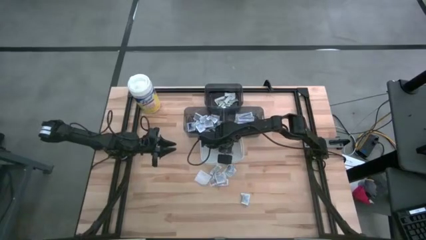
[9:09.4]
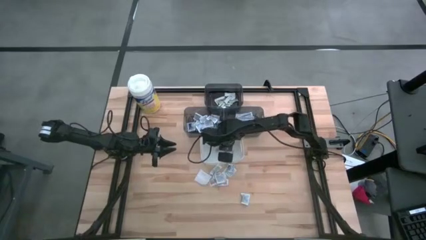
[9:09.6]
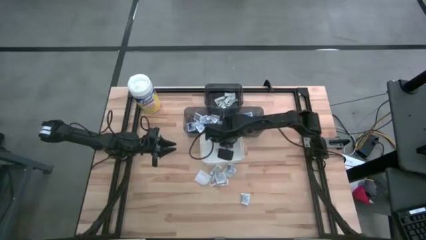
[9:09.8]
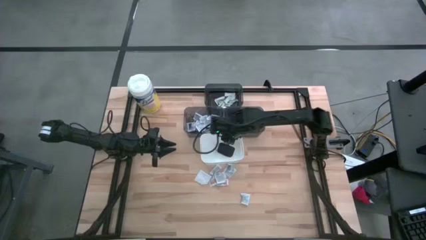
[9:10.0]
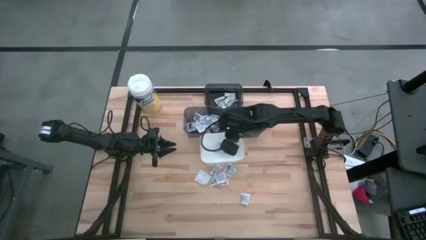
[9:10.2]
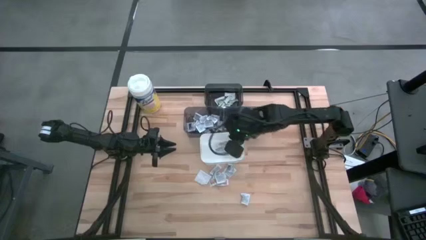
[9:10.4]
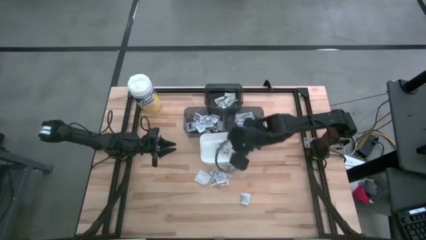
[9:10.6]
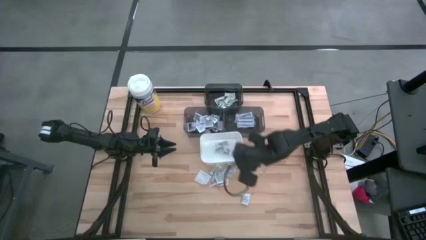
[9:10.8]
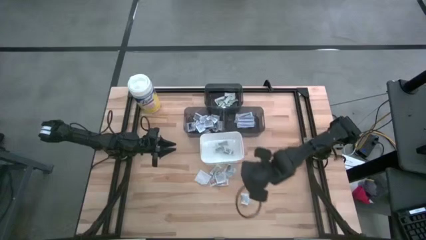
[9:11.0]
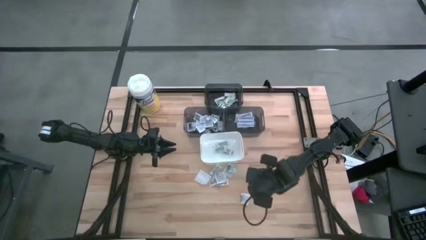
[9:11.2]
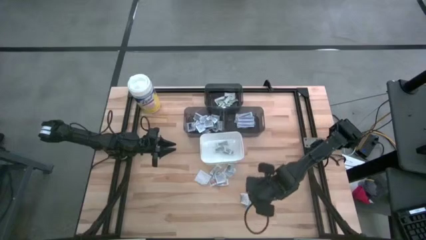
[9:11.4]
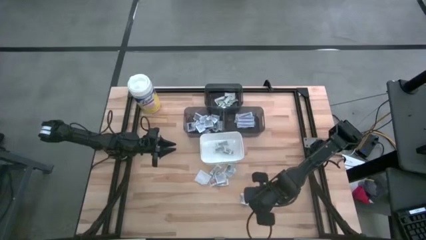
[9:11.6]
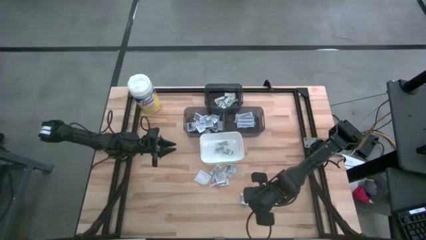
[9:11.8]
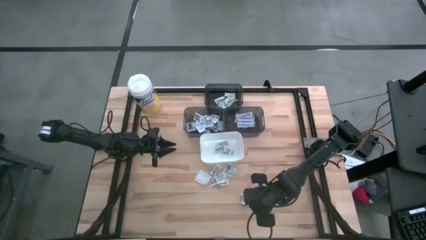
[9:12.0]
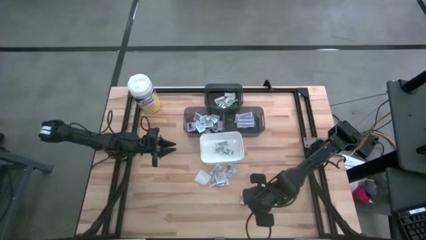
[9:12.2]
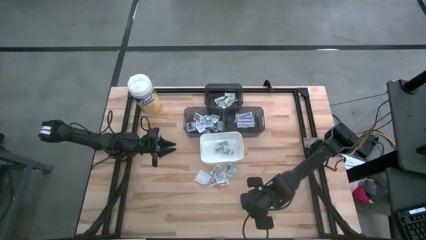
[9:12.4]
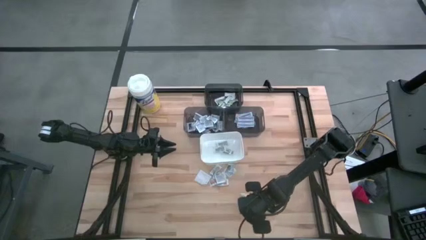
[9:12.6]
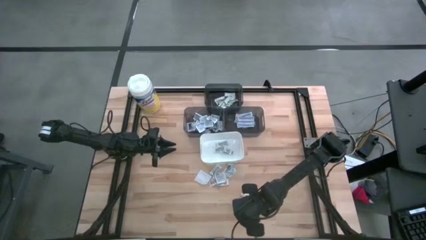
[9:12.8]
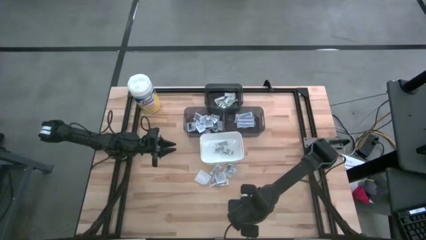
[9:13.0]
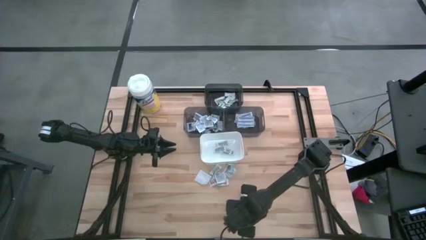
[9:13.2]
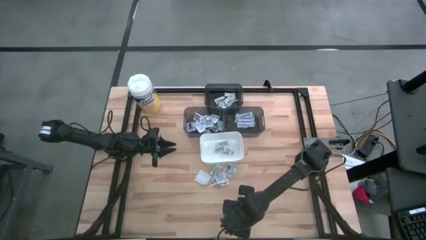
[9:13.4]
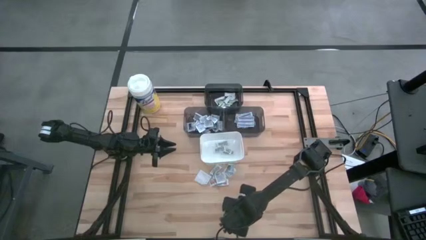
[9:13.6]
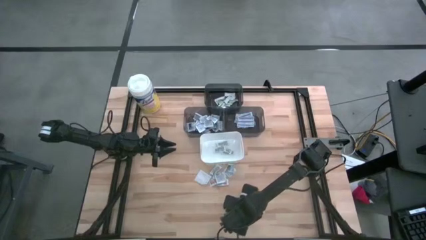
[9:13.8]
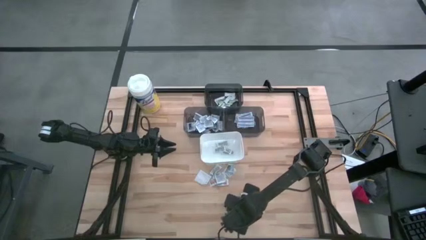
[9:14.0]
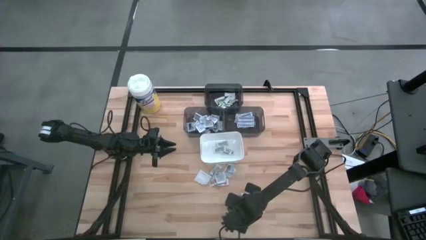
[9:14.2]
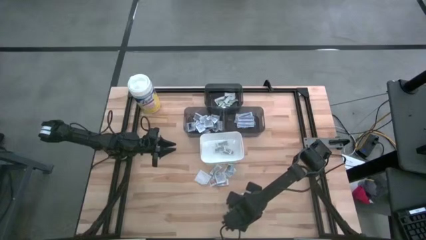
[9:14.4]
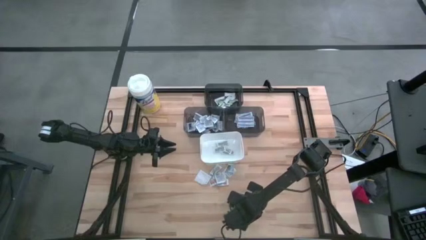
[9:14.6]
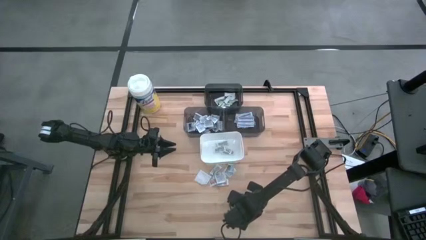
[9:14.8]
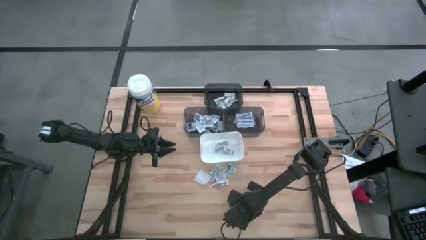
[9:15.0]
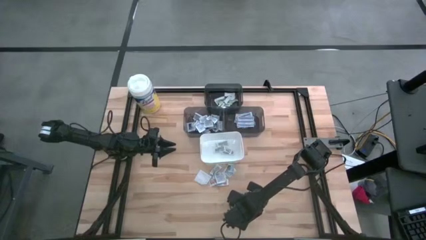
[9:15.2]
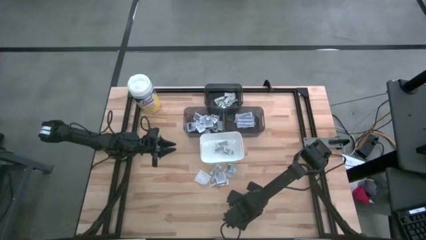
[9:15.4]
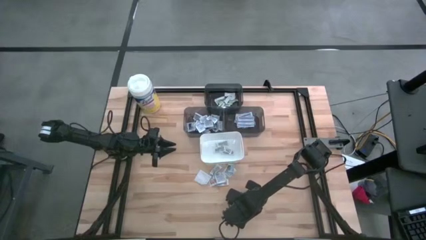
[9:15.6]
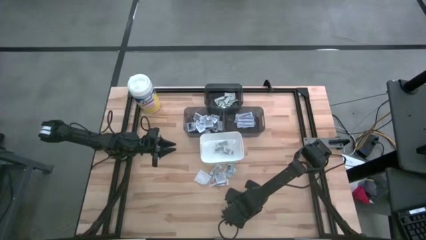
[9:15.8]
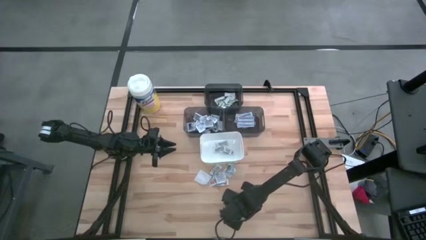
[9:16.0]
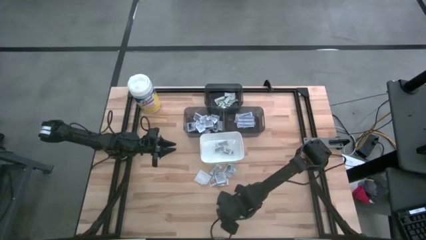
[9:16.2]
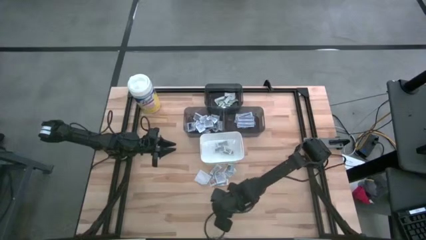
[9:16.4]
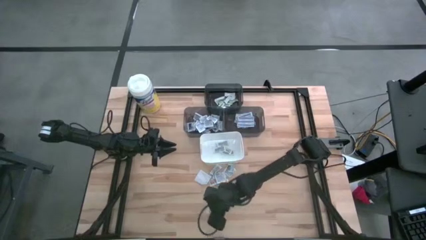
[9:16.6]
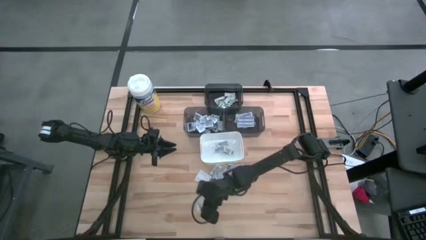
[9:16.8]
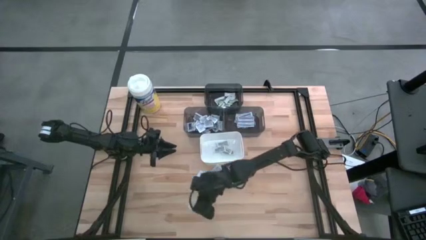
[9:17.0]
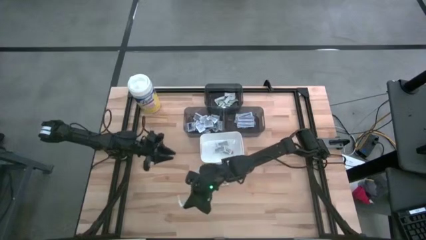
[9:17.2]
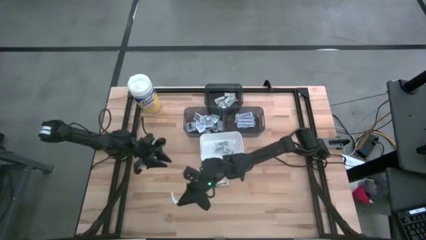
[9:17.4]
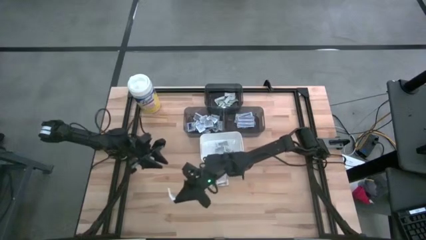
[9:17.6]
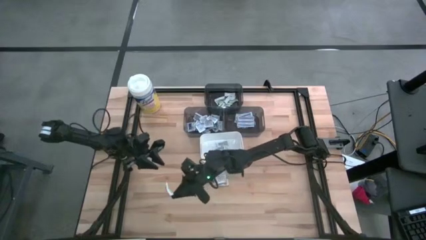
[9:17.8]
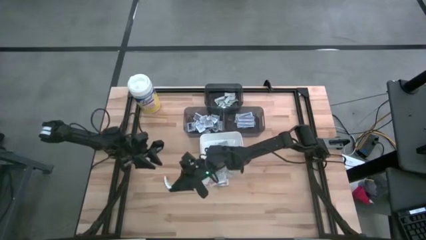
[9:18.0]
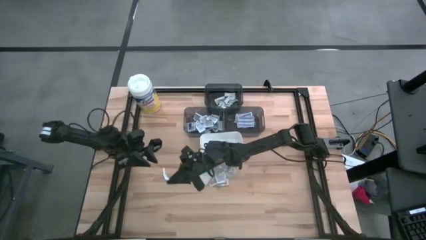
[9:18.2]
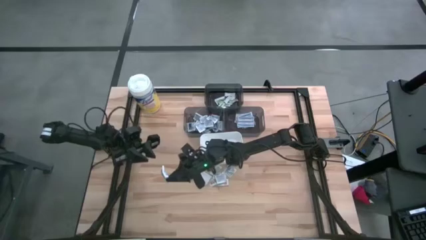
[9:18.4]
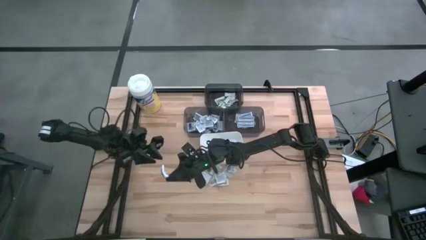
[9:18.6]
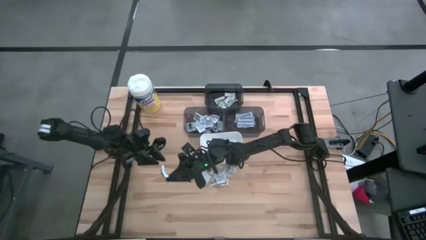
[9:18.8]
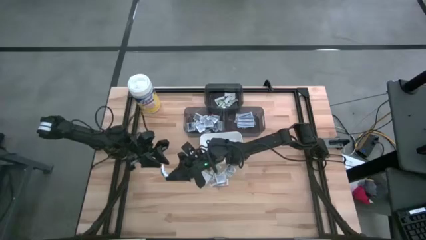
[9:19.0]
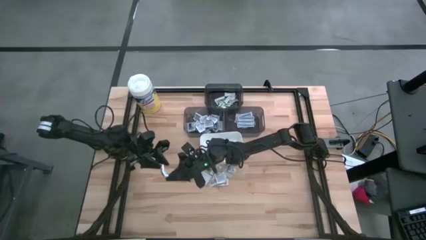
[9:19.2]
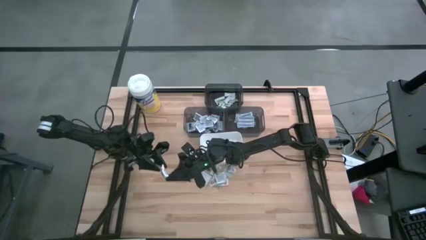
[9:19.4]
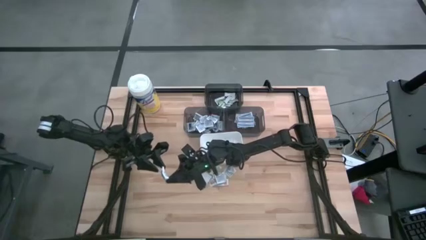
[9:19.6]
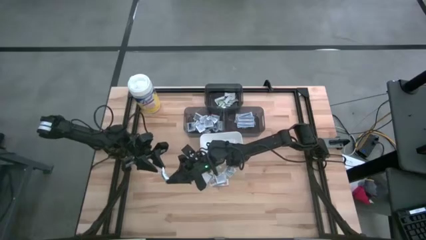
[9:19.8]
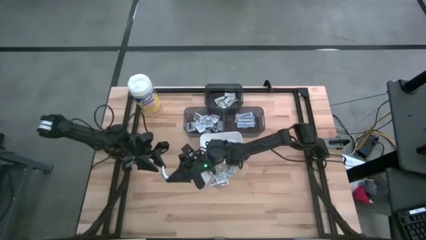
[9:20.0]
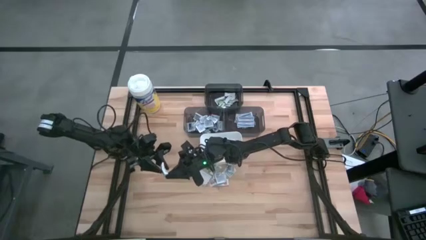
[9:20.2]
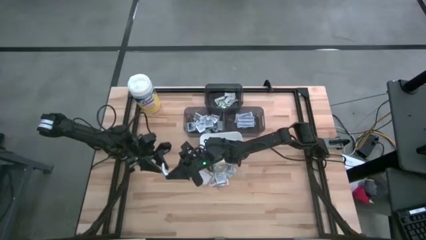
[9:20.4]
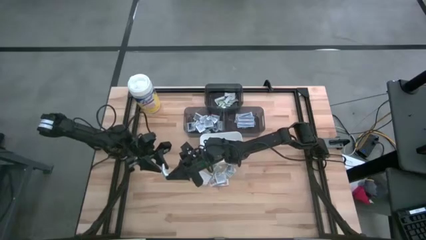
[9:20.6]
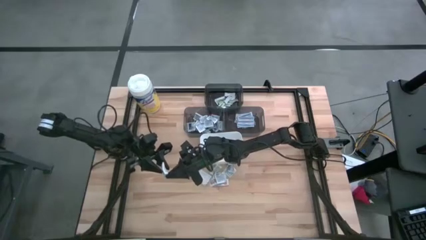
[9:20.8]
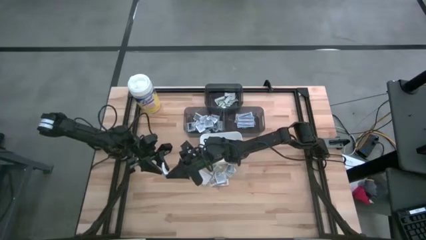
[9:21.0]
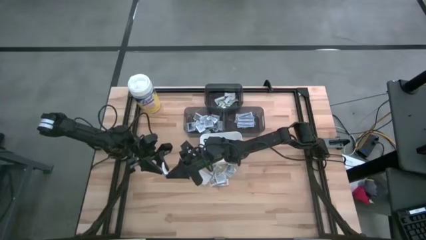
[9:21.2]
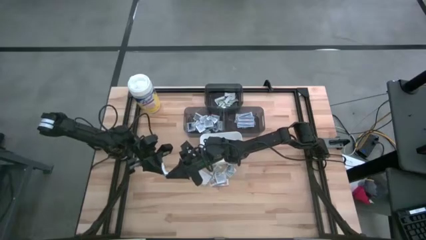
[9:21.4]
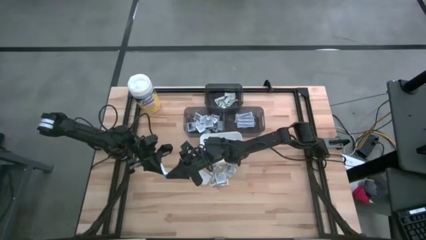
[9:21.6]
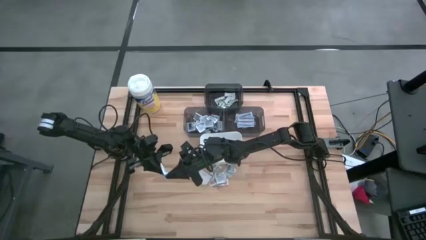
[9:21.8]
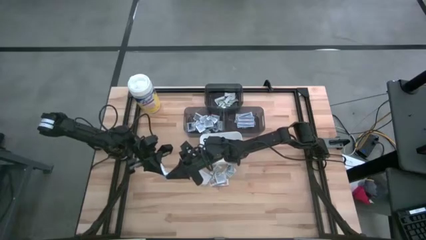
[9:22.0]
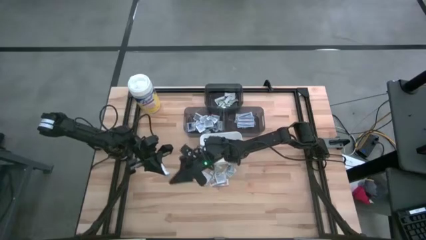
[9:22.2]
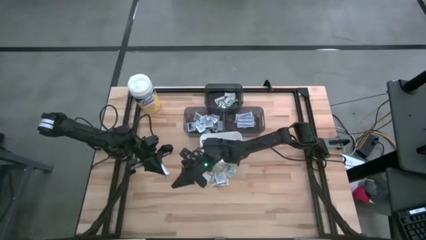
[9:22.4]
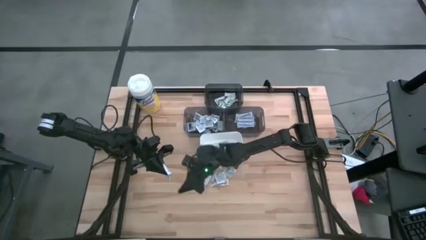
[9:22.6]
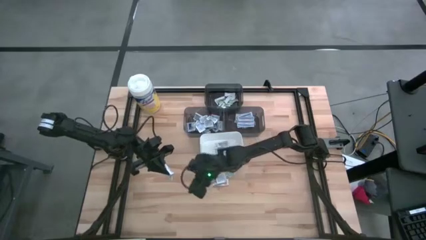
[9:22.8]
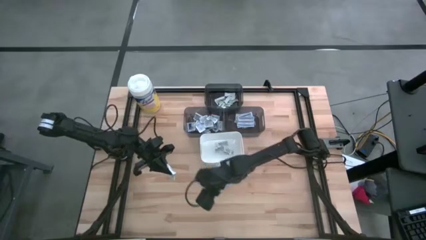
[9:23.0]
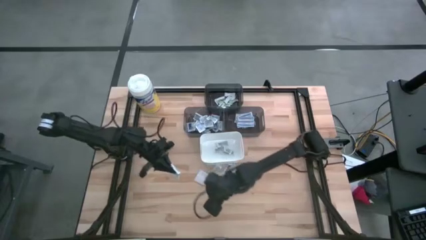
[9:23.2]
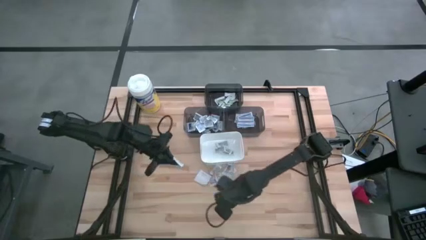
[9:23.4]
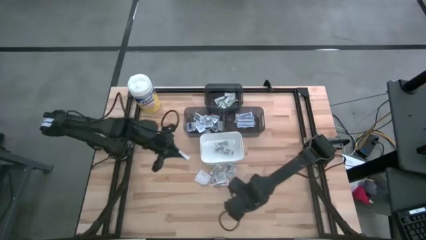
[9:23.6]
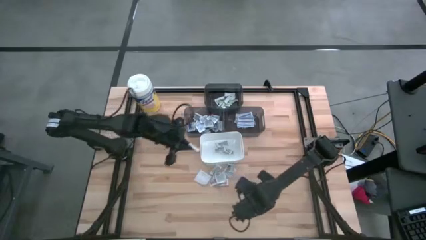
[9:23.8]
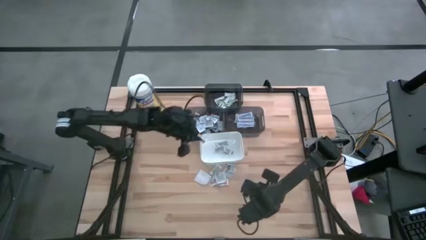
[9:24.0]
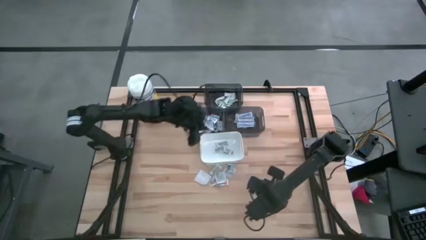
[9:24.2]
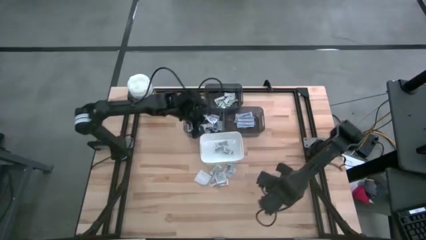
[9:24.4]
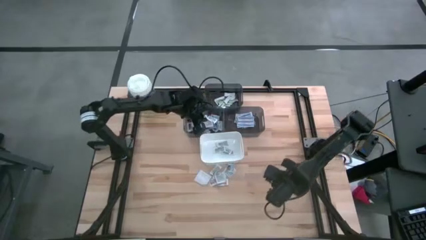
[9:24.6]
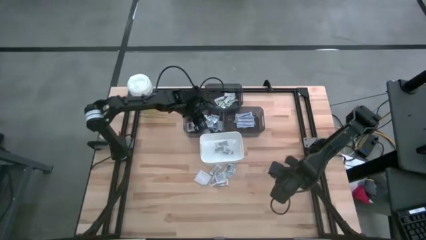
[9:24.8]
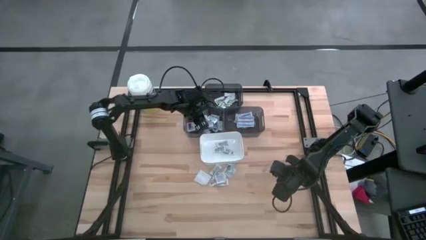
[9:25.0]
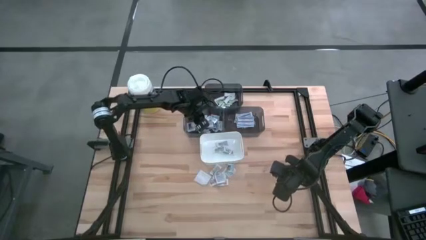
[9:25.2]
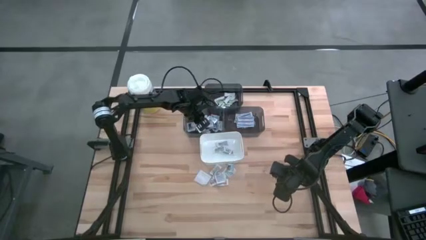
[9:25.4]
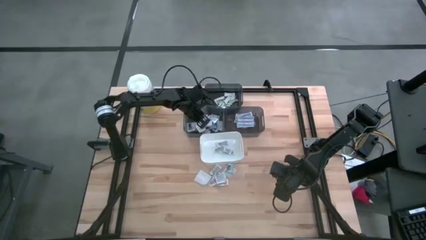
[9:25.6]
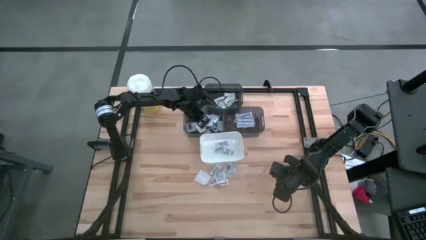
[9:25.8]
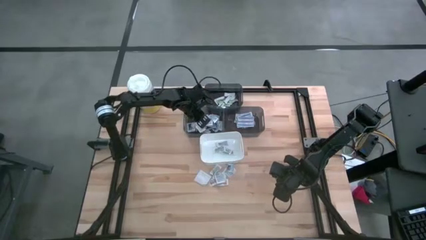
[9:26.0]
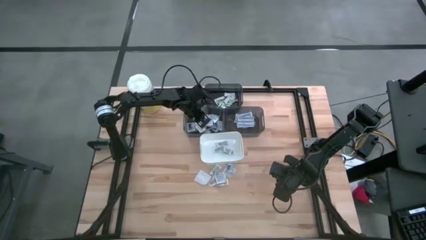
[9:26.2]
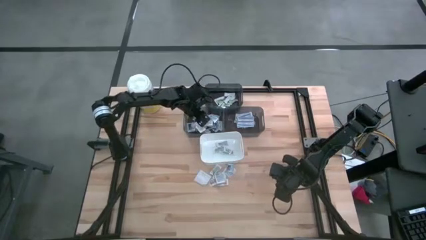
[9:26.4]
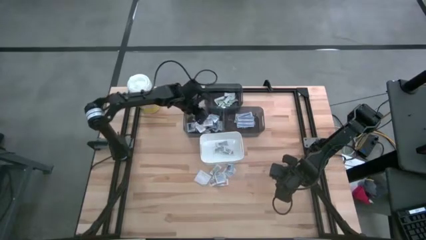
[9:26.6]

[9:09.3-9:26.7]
Task: Pick & Place First Aid Supplies
Put the alcohol pad into the left black bin
